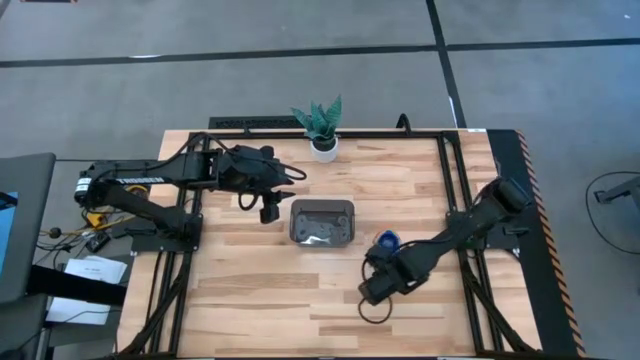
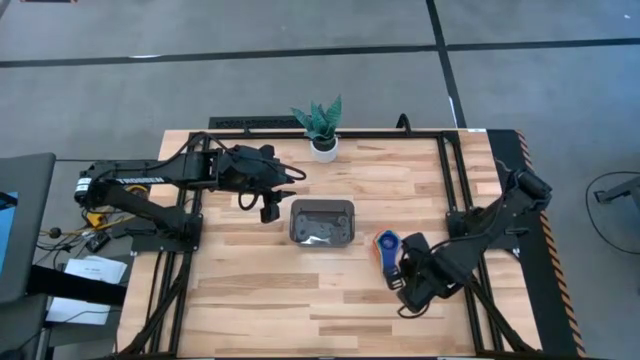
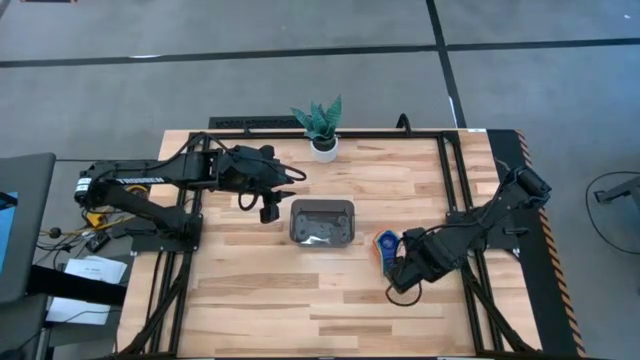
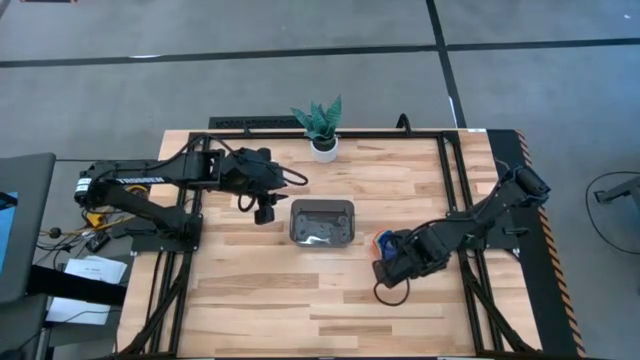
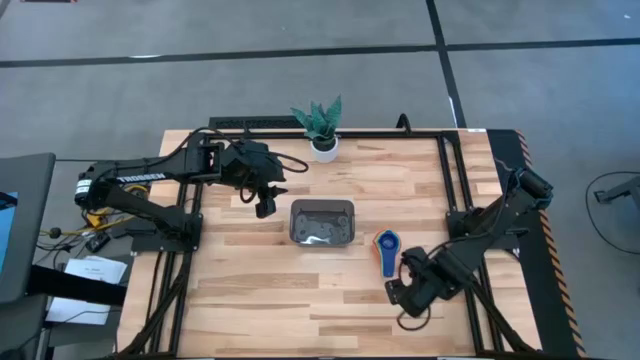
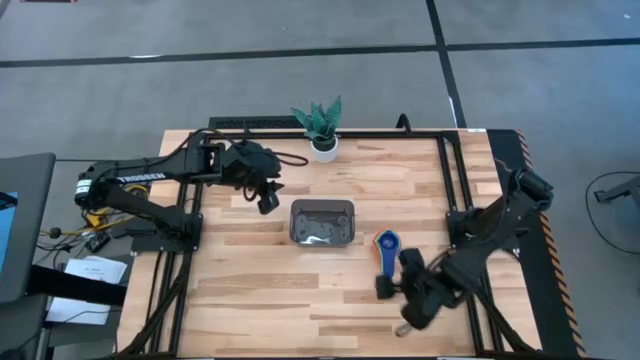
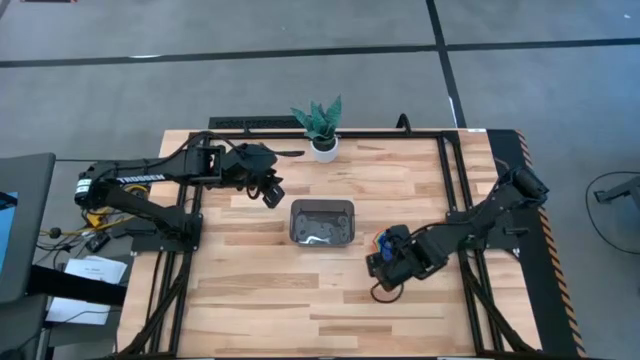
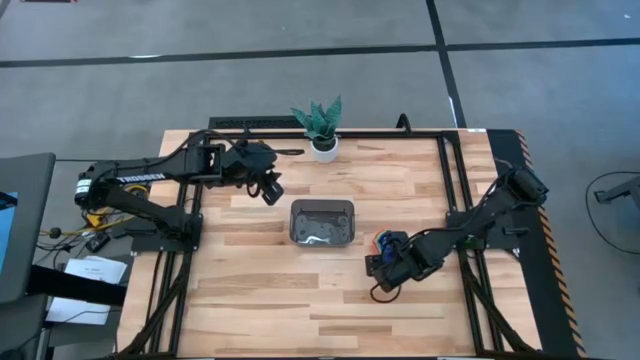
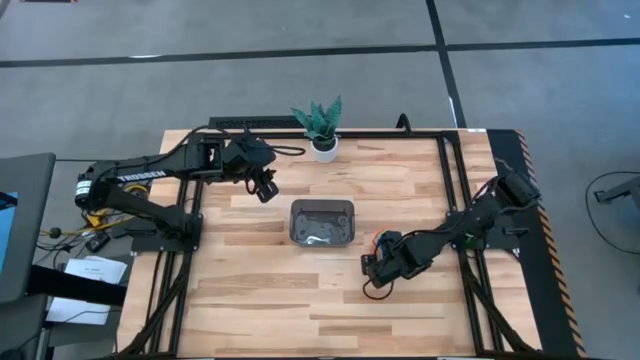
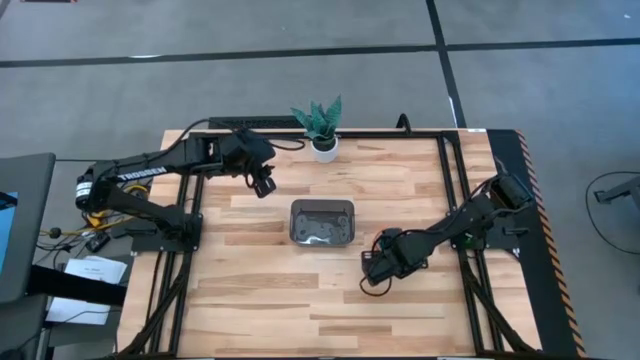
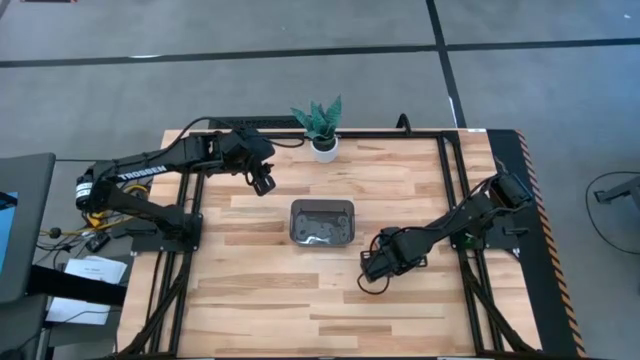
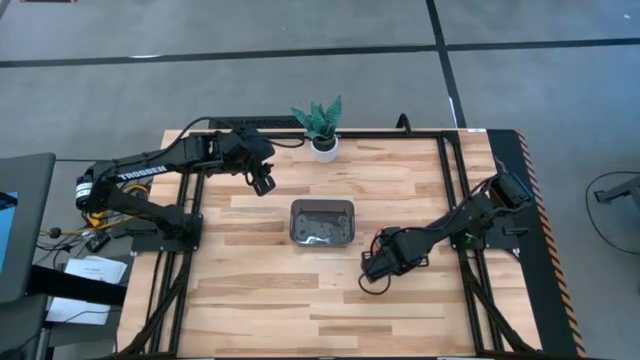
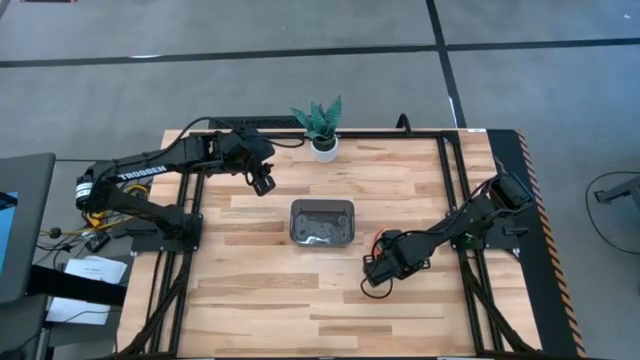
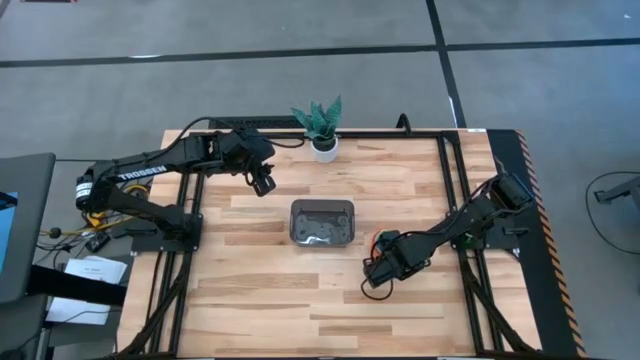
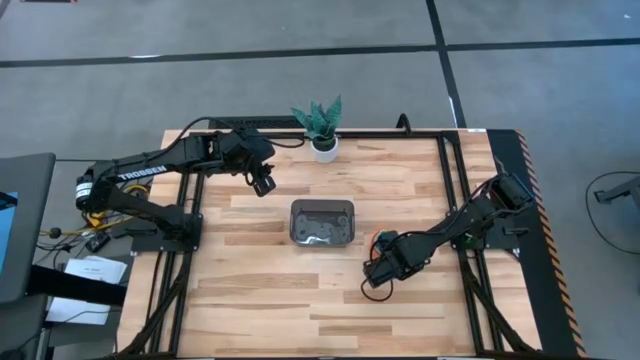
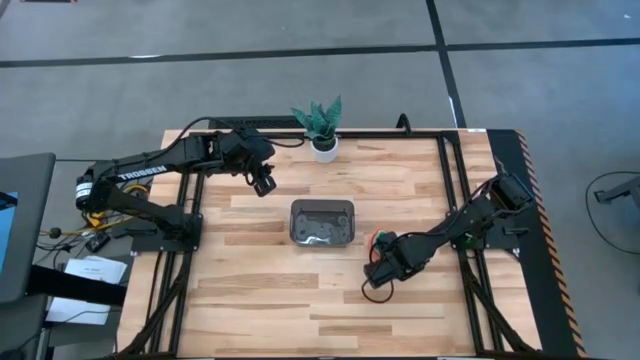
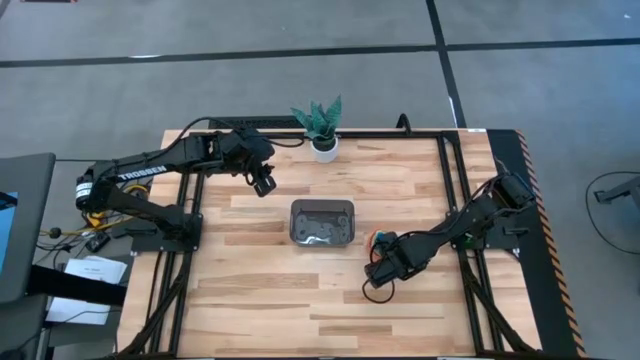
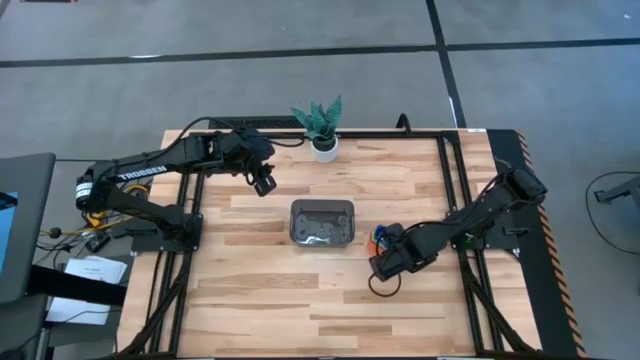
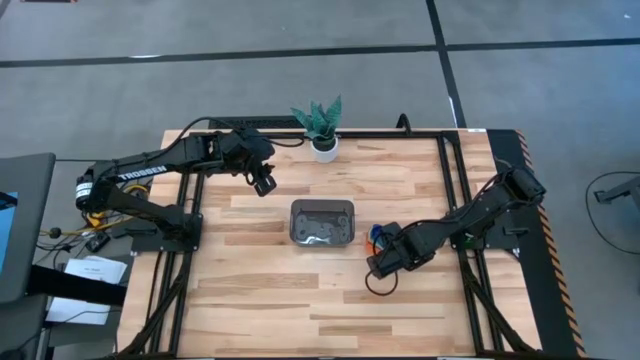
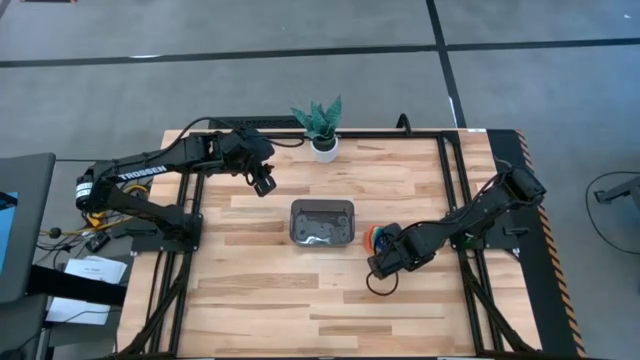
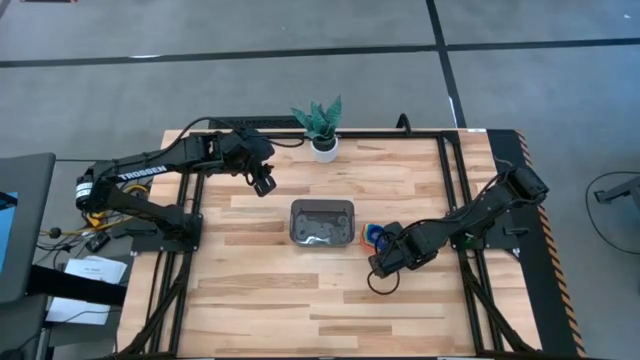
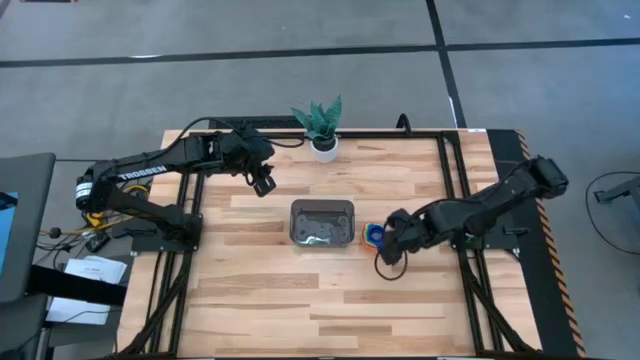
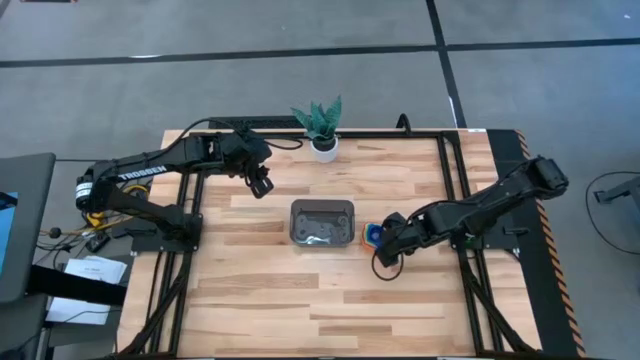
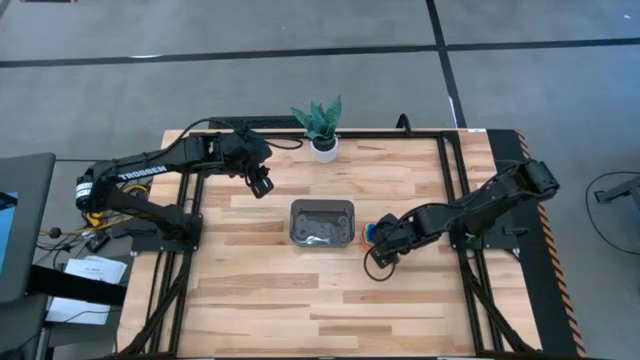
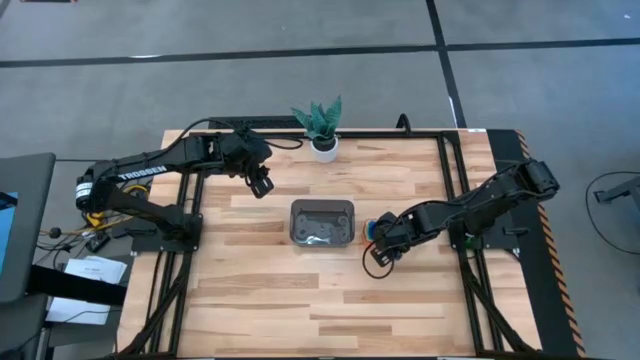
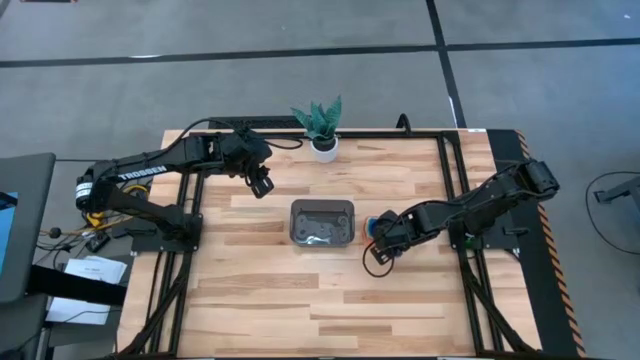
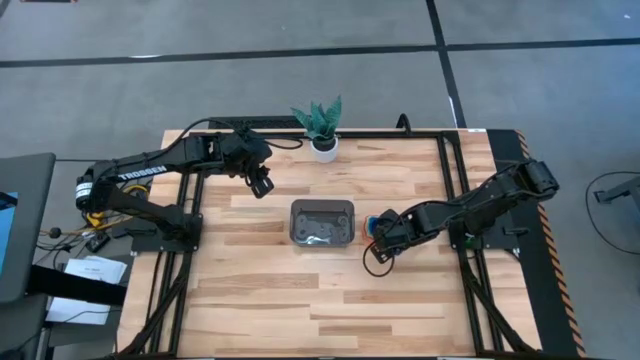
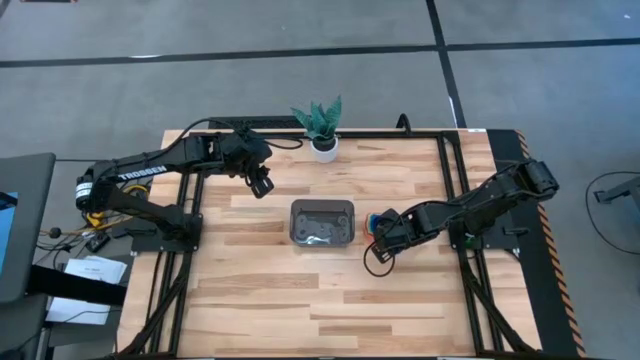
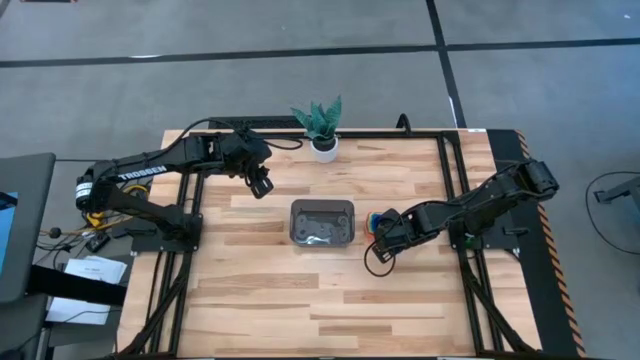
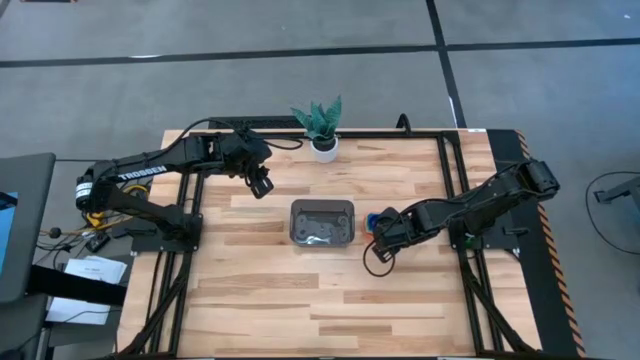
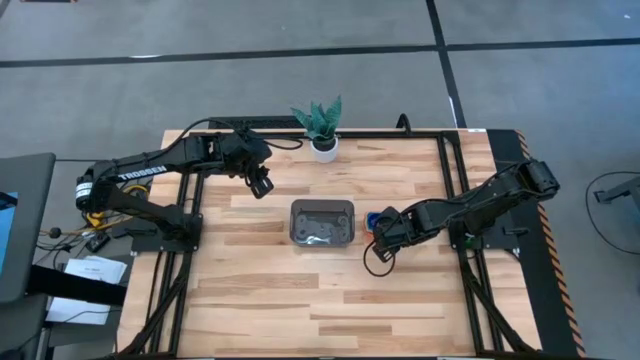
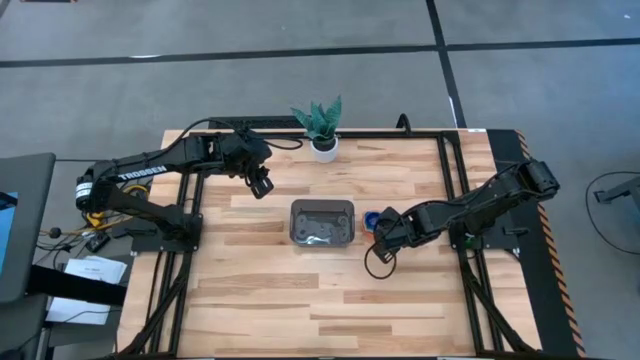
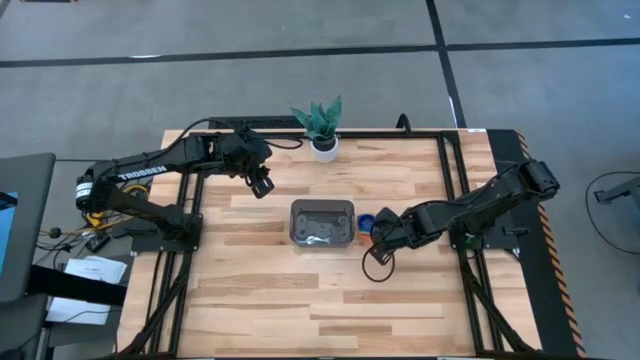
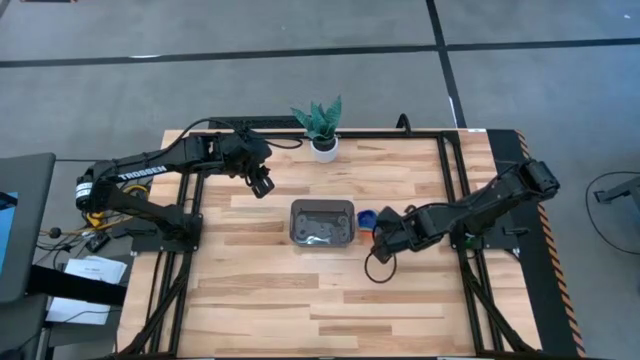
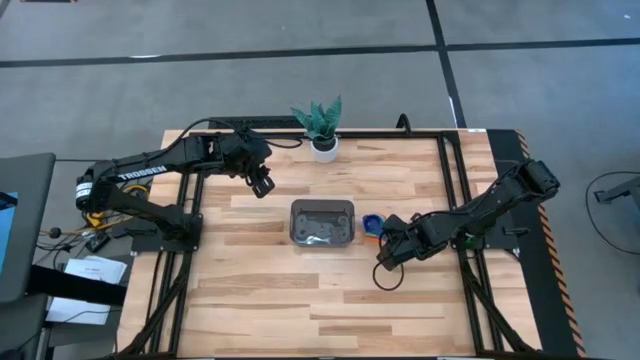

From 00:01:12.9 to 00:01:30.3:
Task: Nest measuring cups in basket
Put the nested measuring cups into the black bin

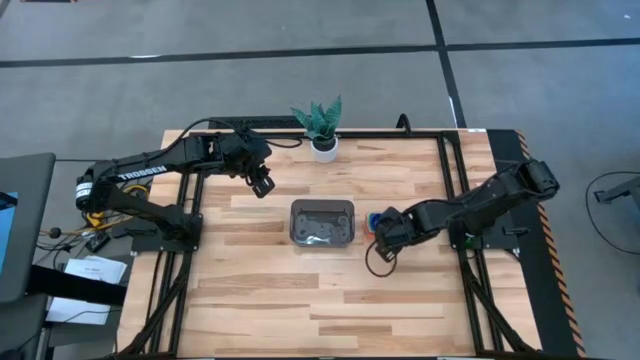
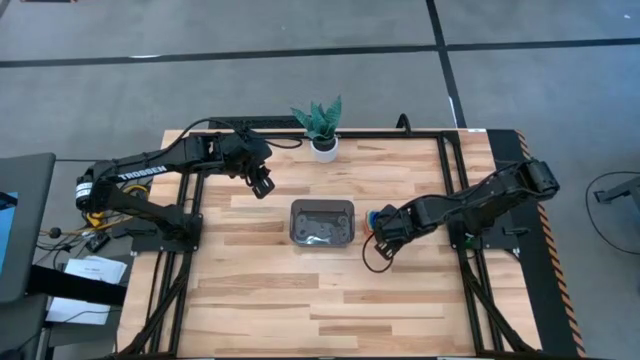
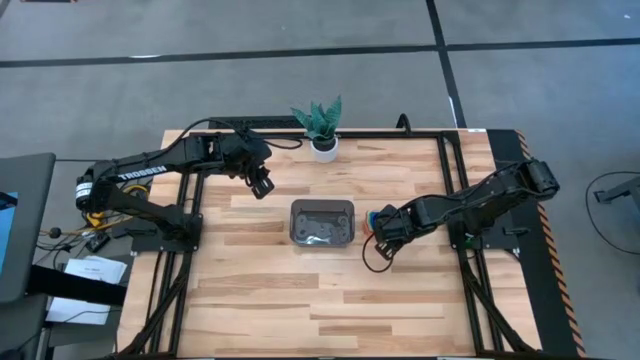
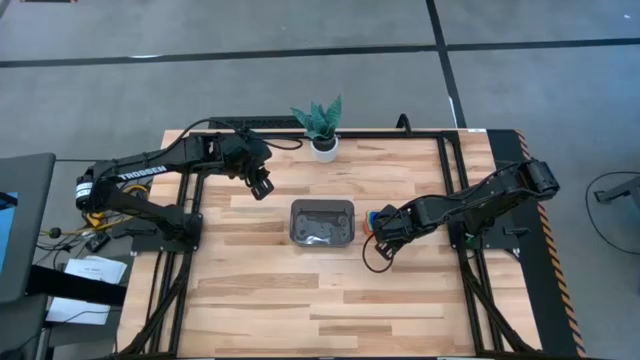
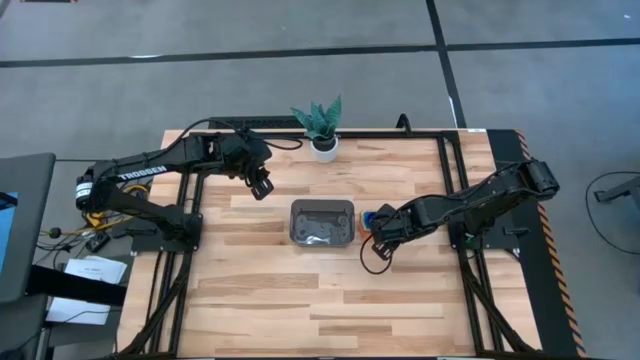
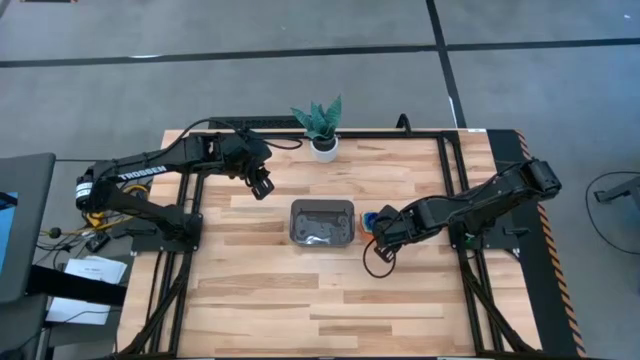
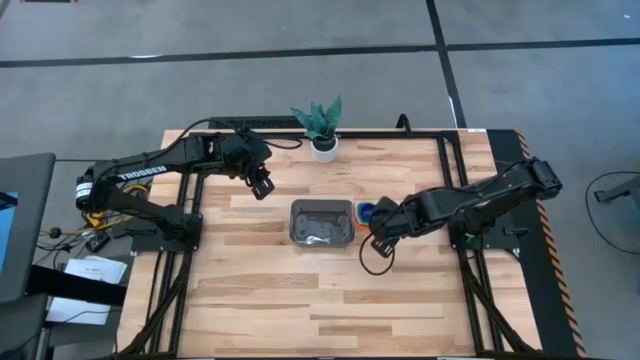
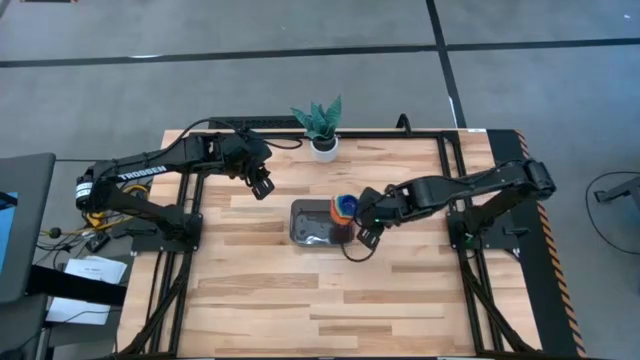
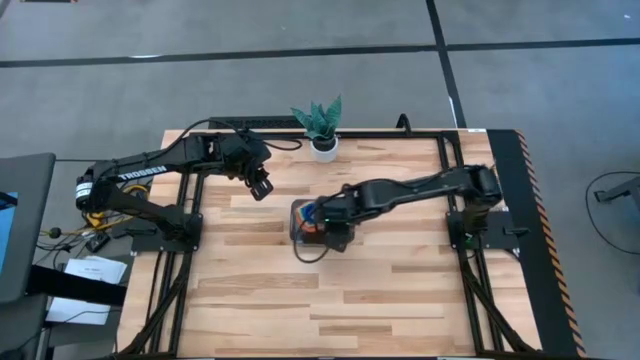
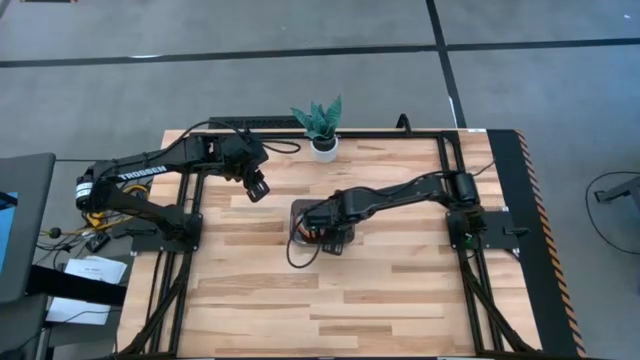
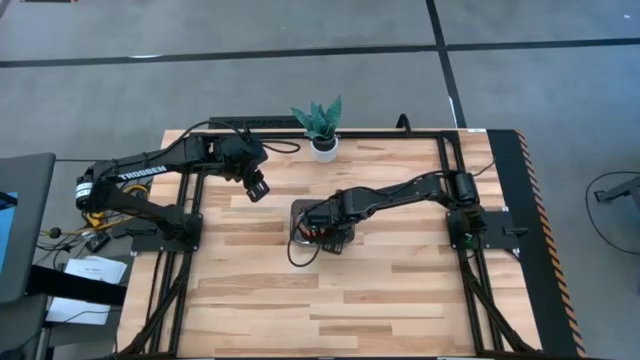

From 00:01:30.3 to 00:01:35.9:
Put the nested measuring cups into the black bin
